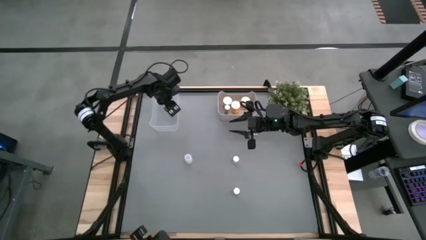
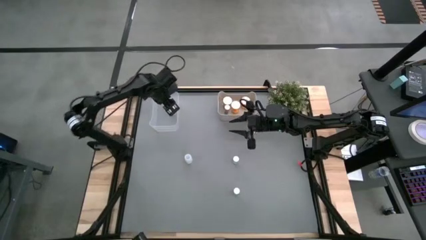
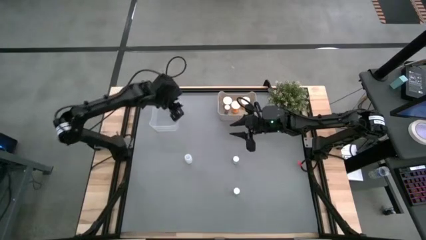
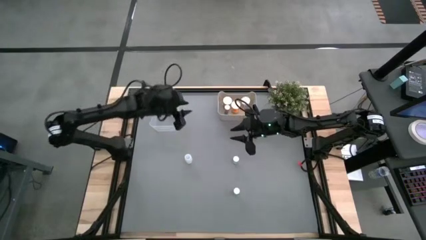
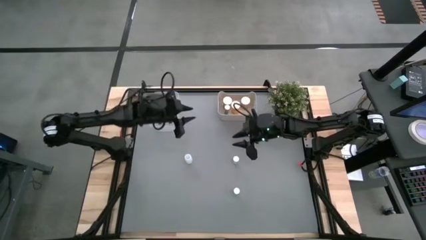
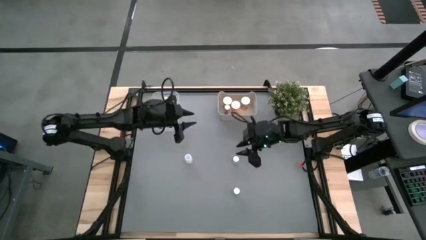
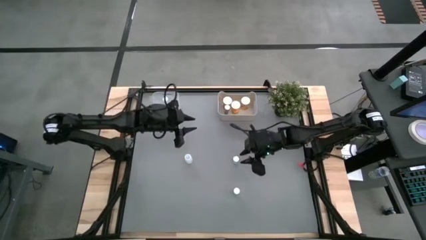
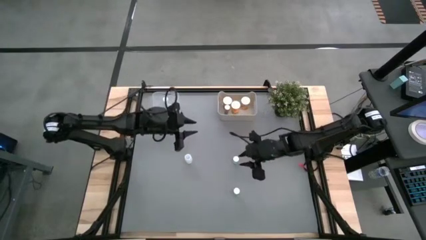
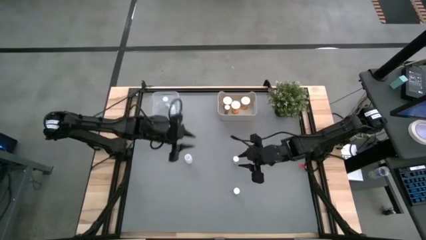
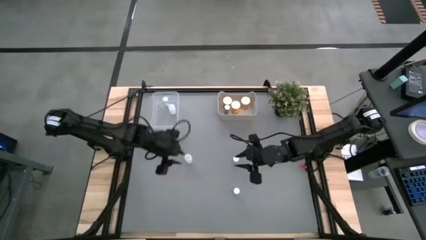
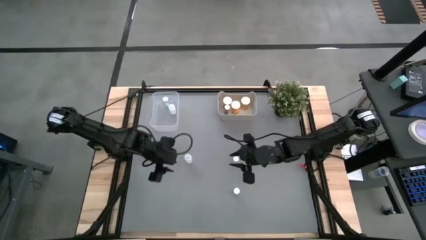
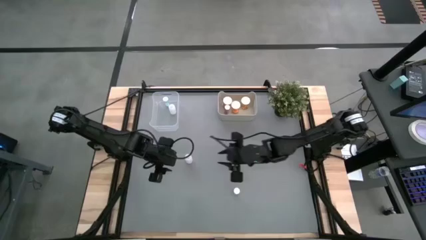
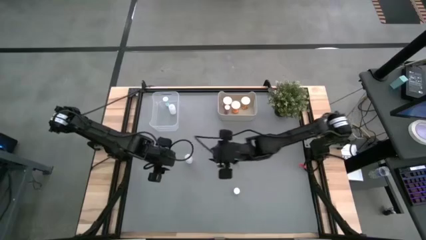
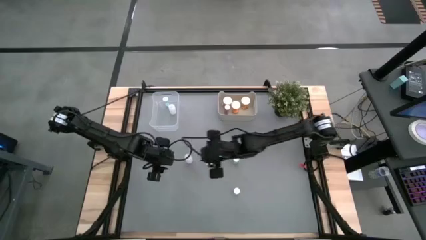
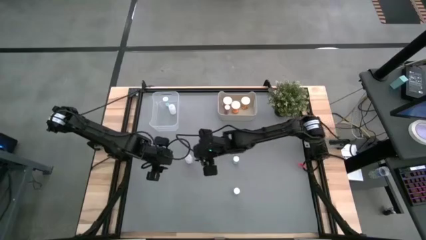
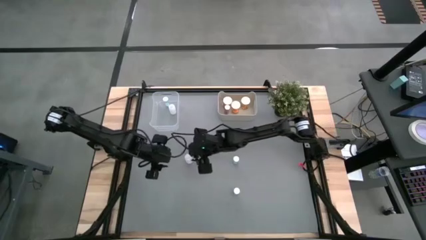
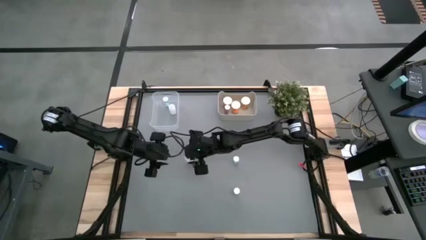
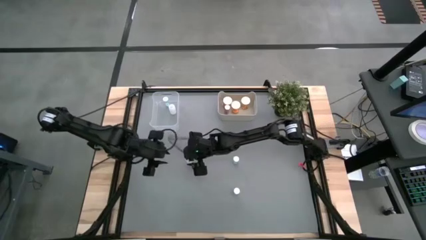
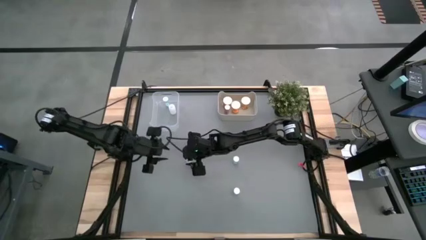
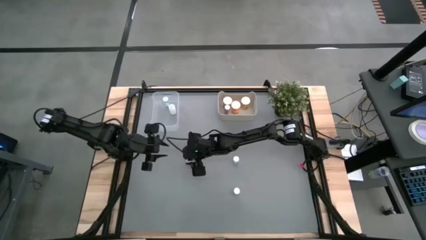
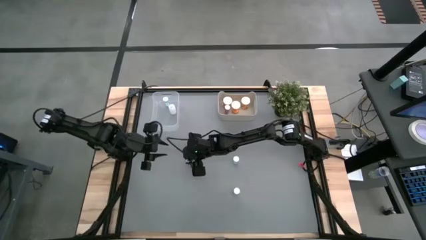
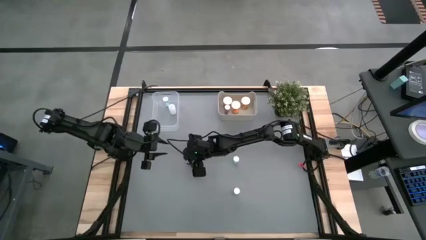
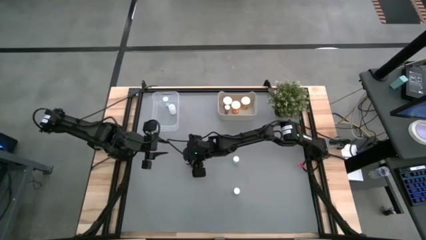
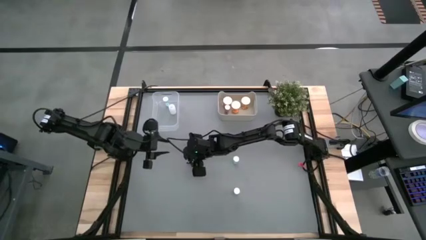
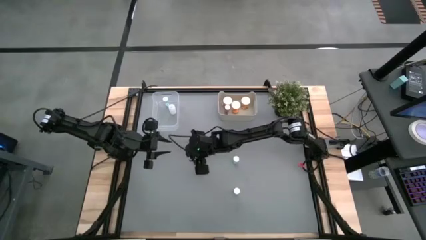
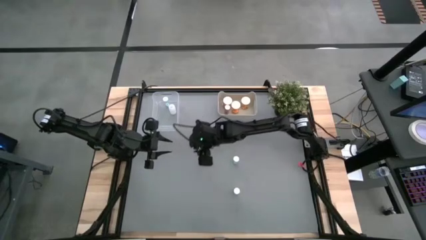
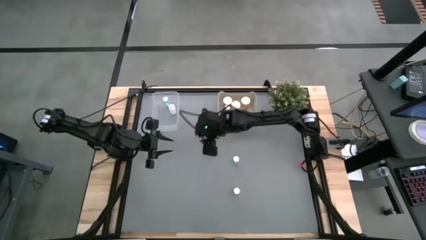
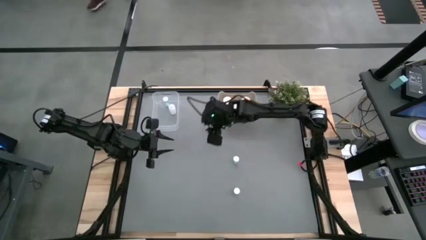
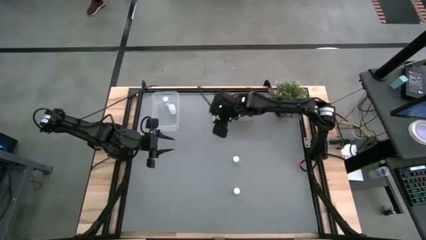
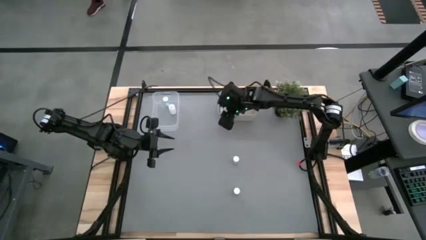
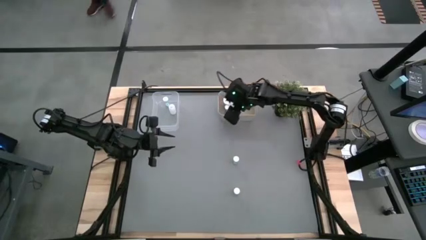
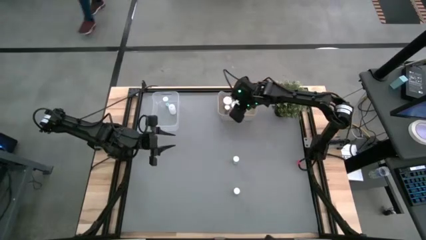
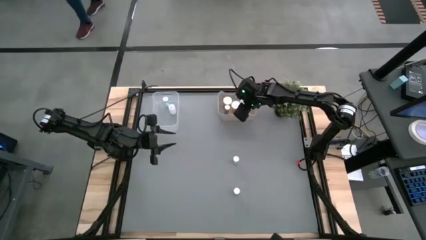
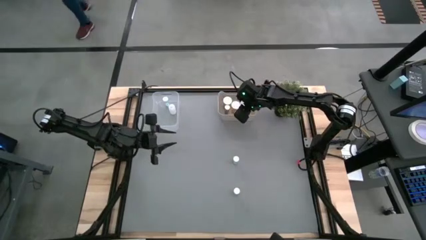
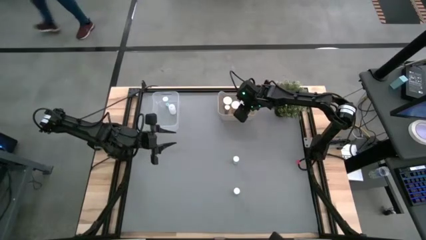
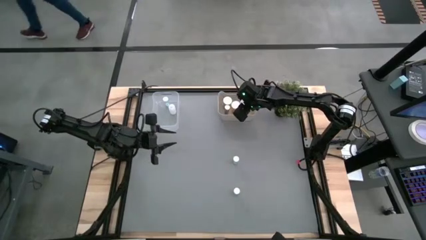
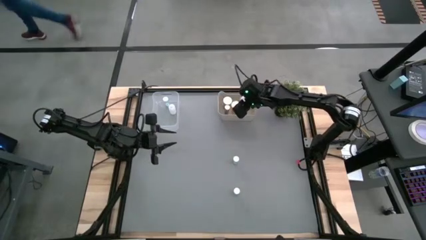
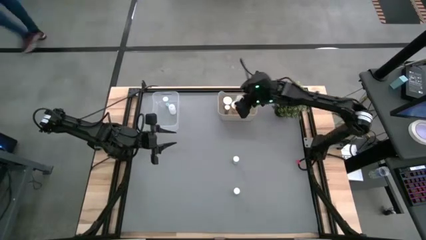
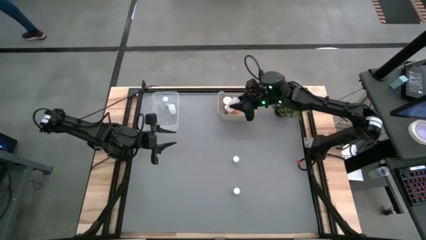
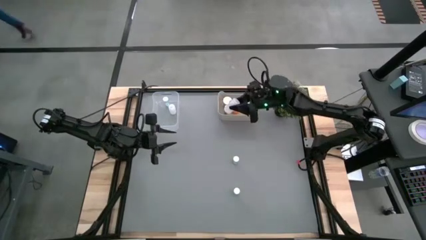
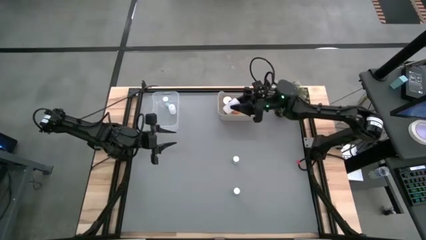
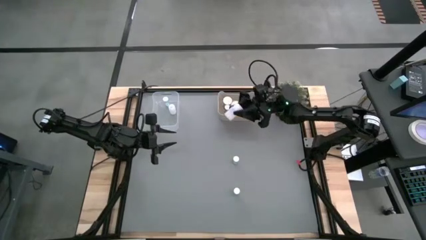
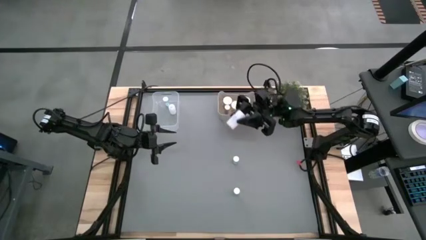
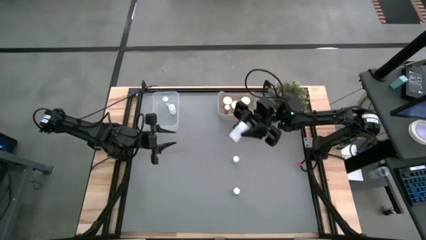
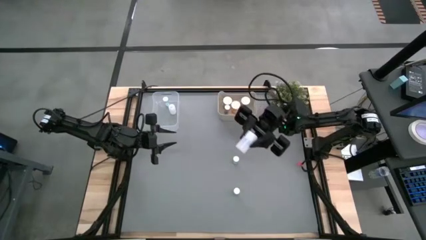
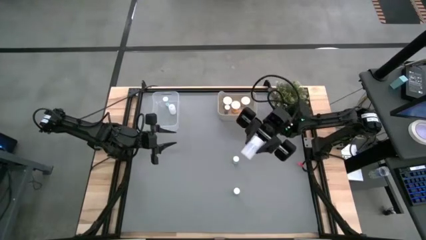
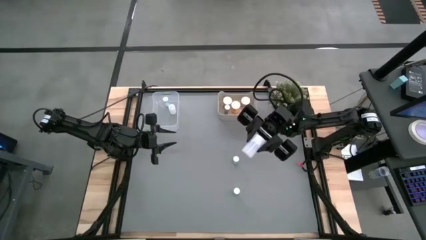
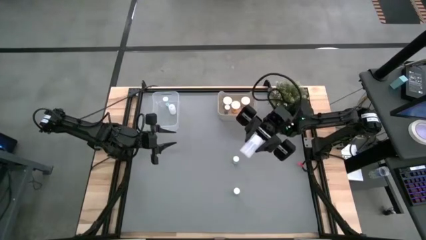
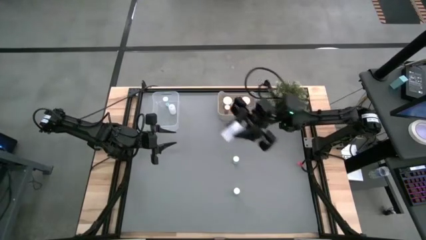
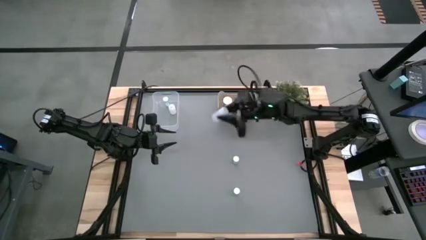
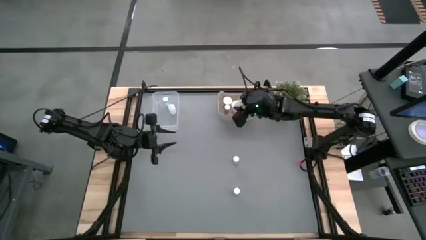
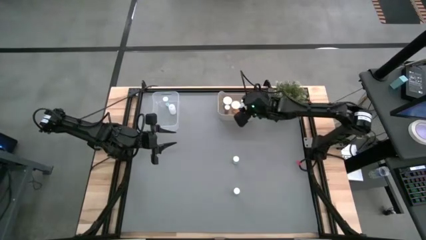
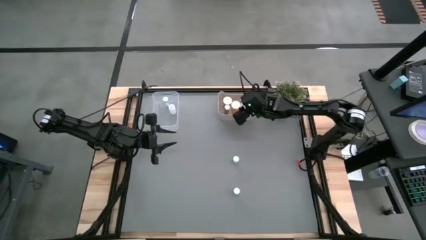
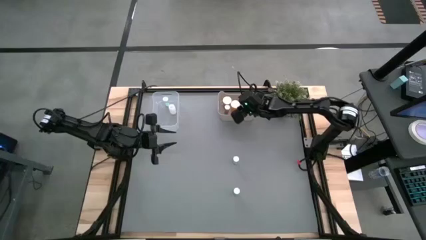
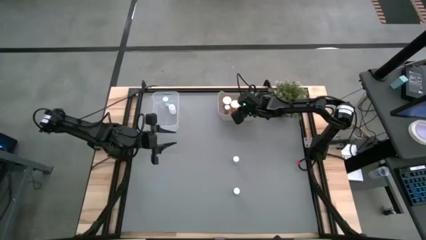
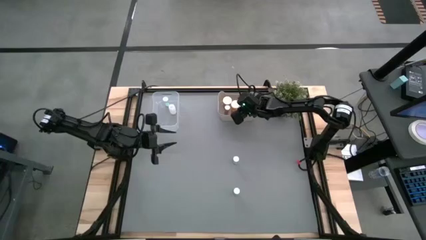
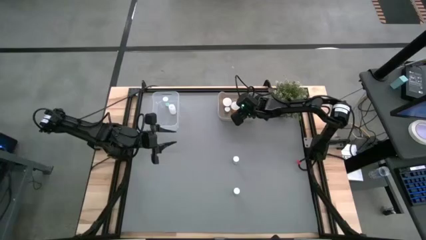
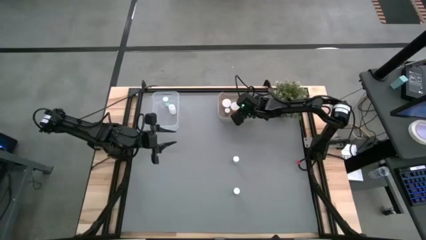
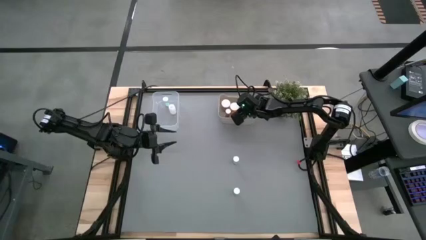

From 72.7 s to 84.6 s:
Task: Pick and place medicine bottles into bin by pill shape (circle, oval)
Put the white capsule bottle into the gray bin

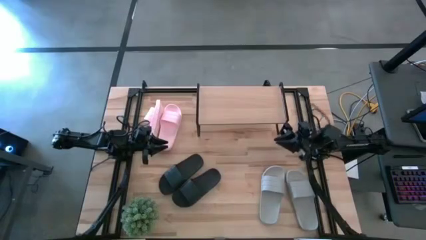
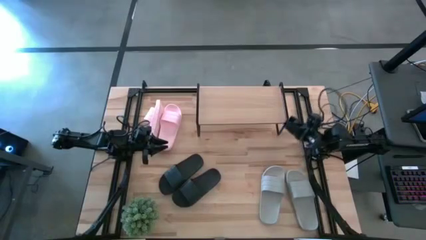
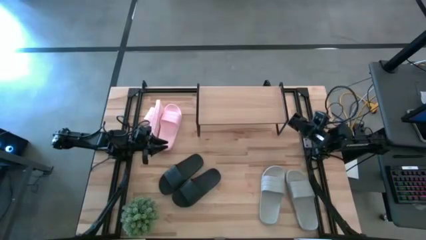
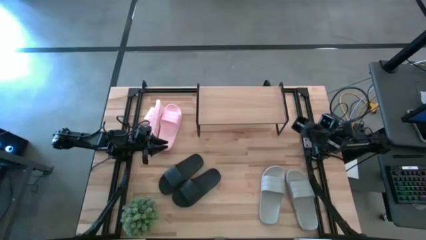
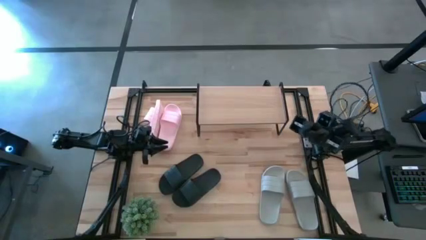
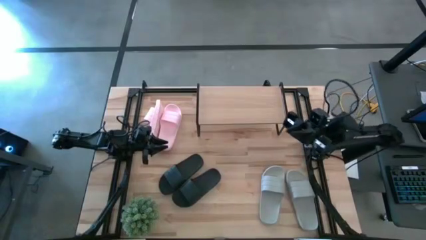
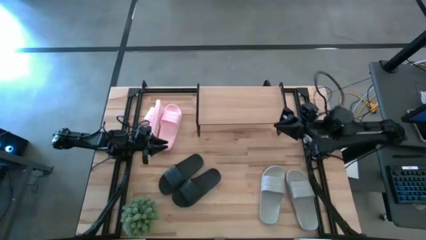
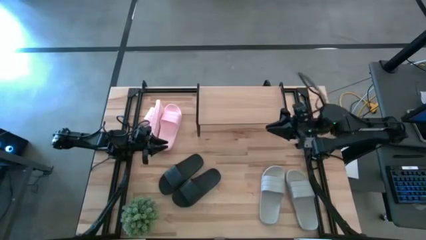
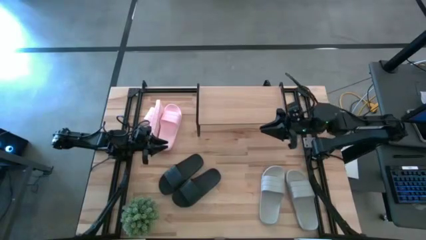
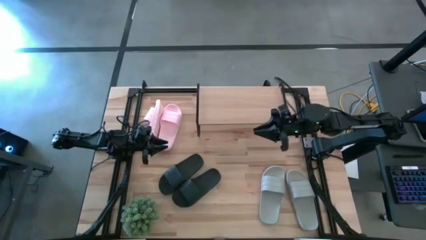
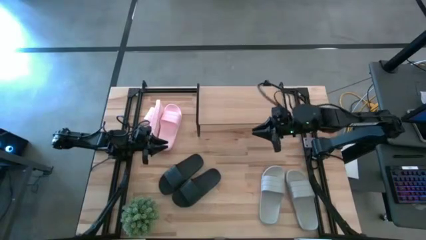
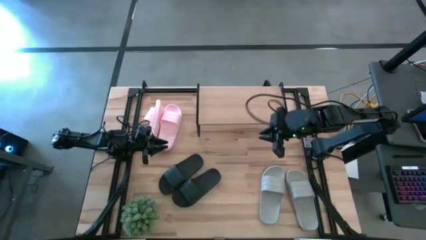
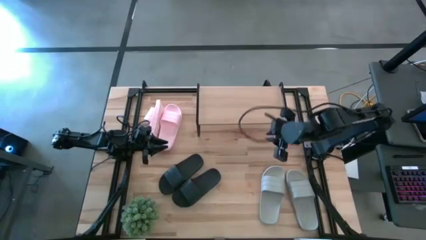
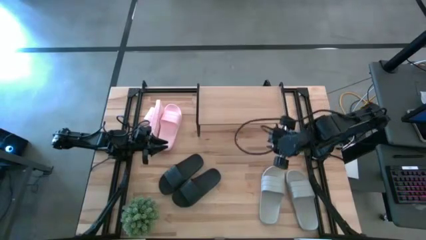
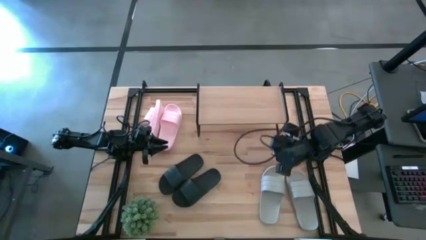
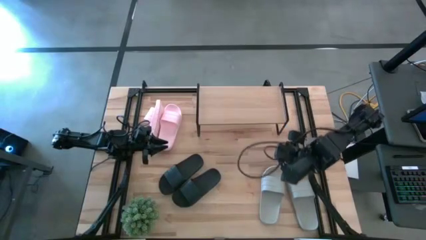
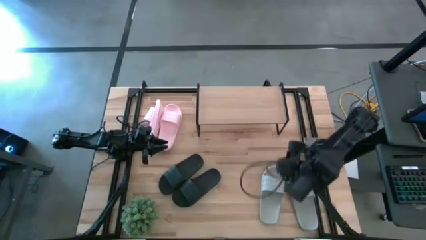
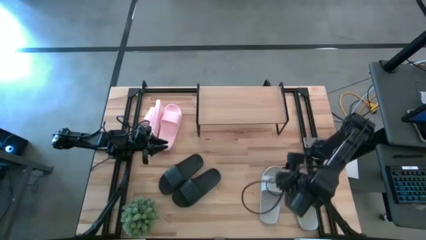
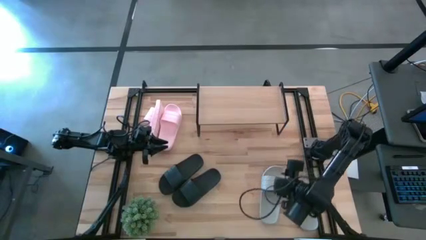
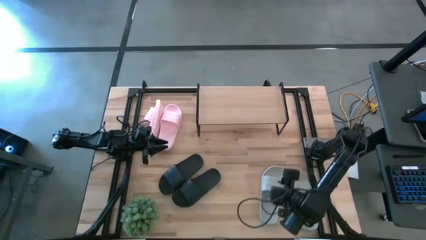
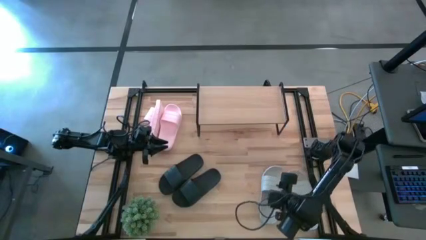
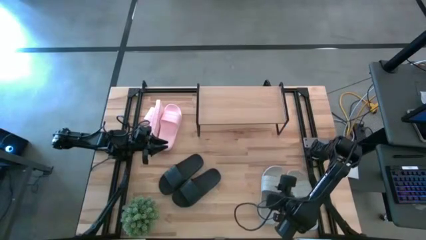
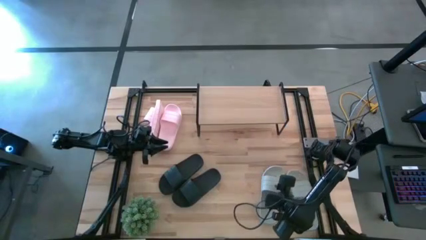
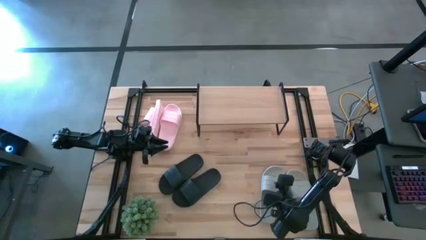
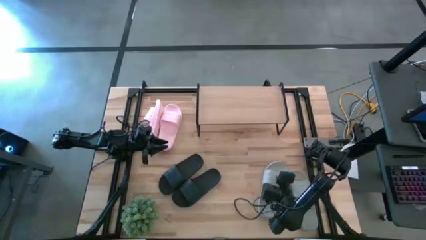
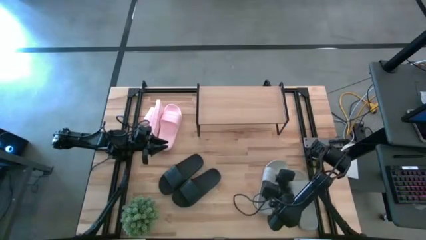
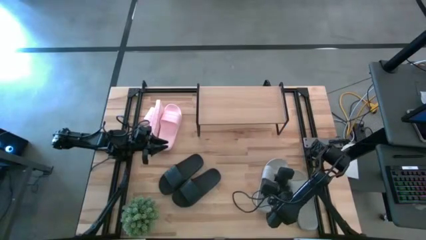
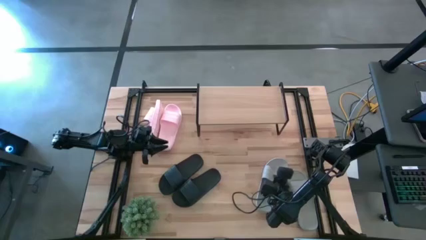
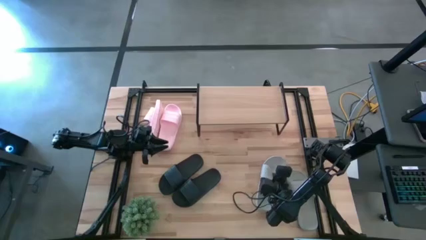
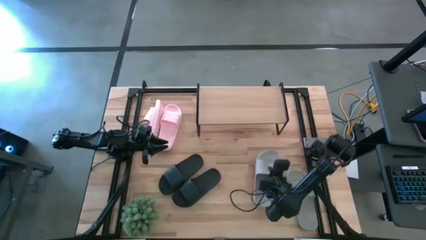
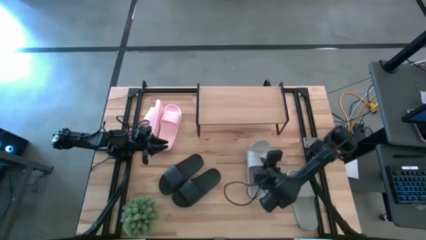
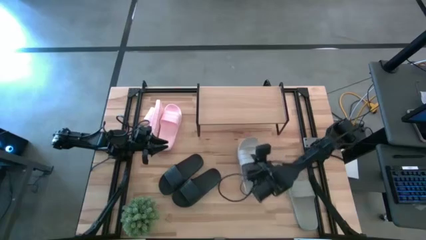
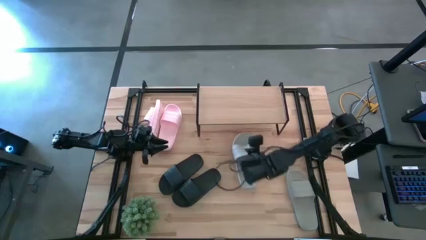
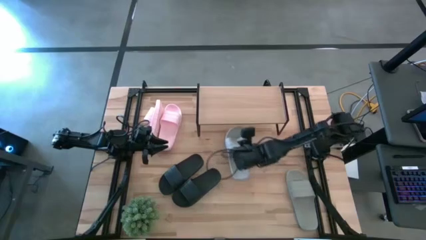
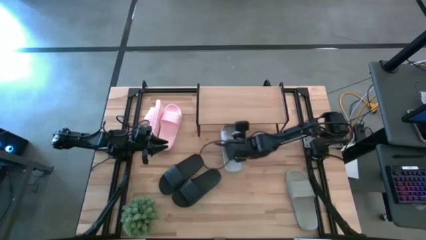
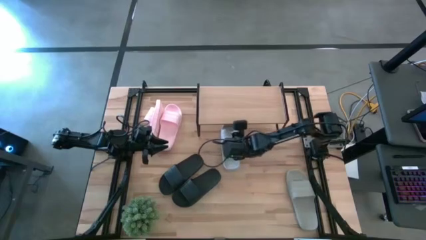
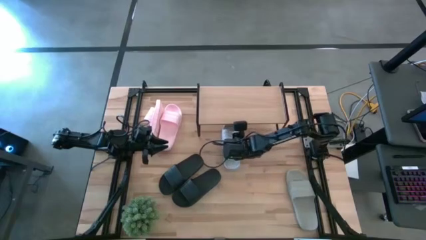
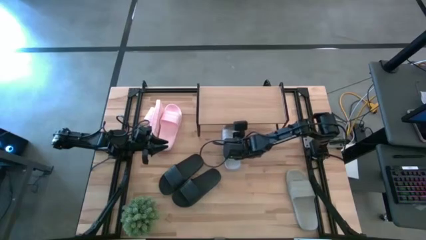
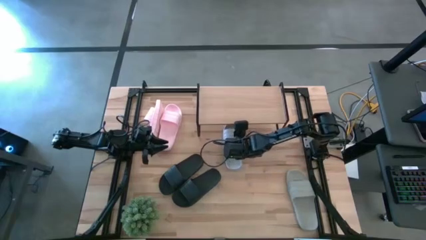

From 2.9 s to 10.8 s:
Task: Pick and place slides into the shelf
Put the left gray slide under the shelf
